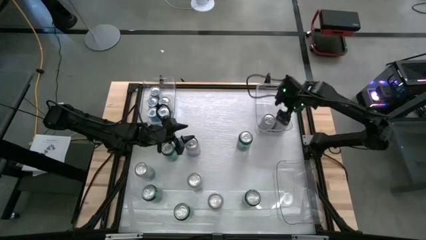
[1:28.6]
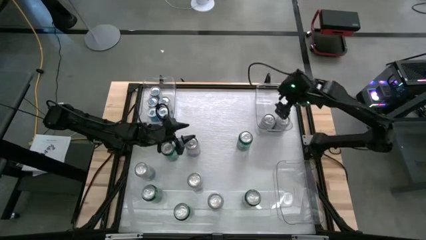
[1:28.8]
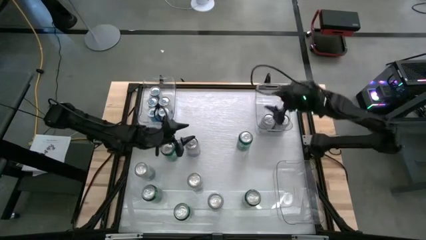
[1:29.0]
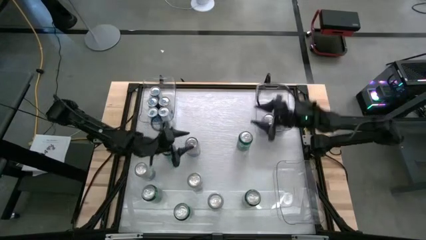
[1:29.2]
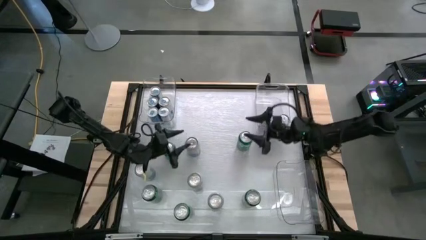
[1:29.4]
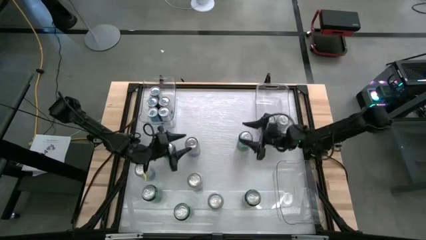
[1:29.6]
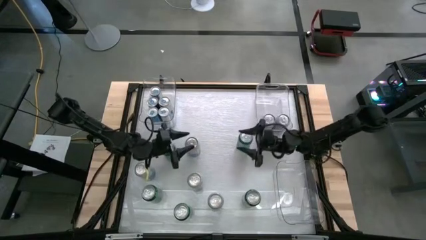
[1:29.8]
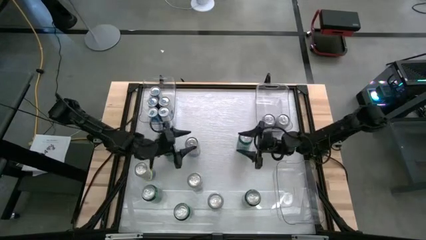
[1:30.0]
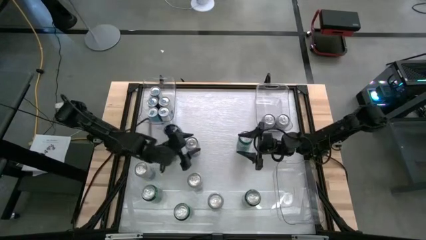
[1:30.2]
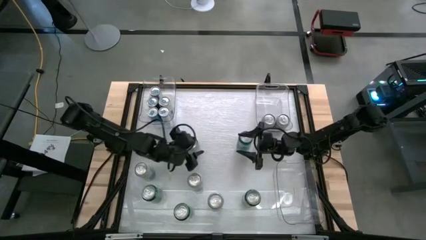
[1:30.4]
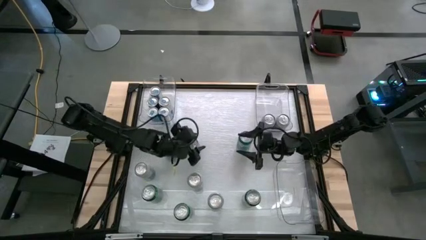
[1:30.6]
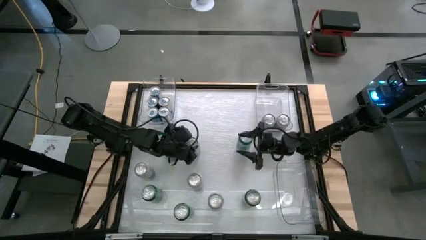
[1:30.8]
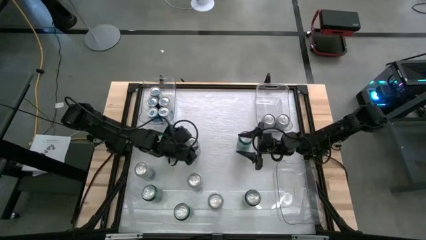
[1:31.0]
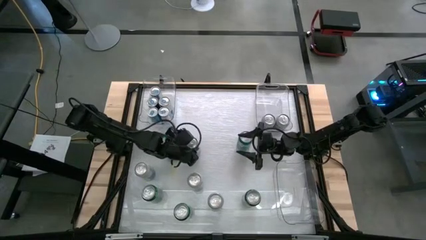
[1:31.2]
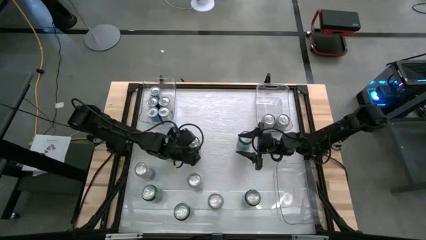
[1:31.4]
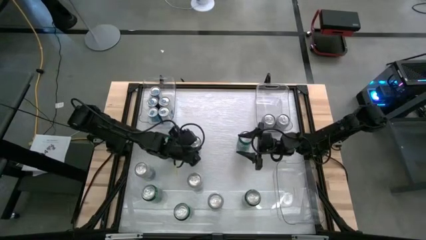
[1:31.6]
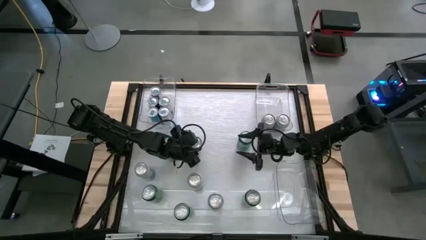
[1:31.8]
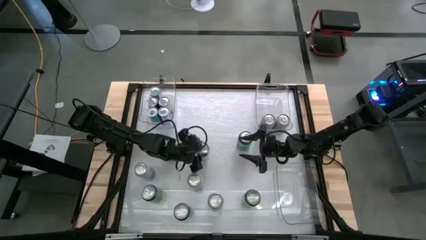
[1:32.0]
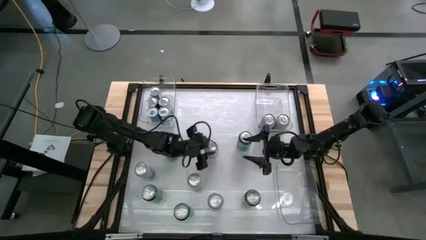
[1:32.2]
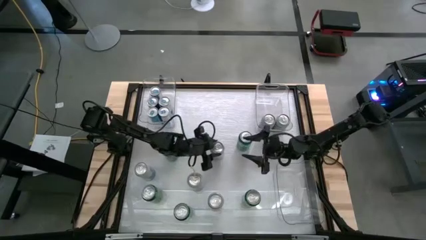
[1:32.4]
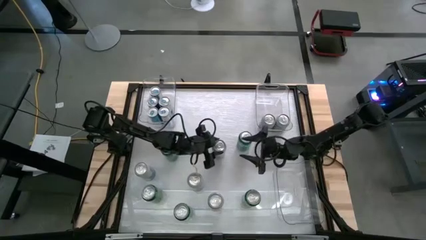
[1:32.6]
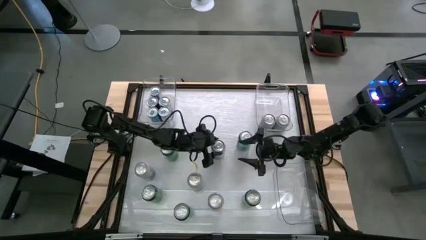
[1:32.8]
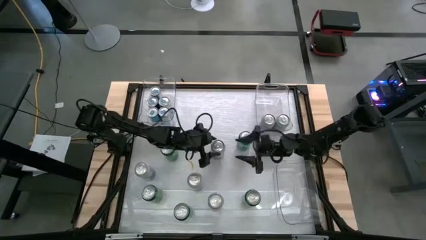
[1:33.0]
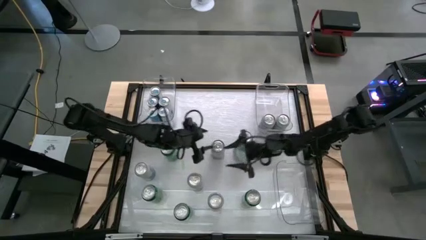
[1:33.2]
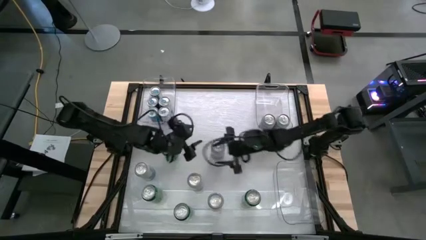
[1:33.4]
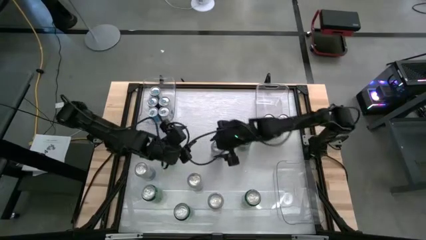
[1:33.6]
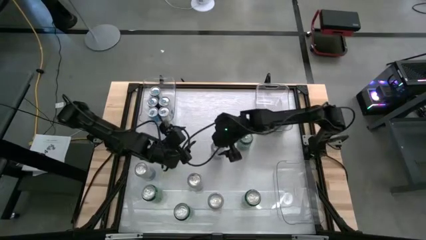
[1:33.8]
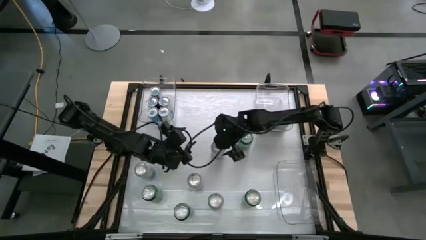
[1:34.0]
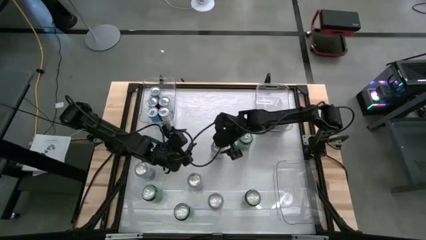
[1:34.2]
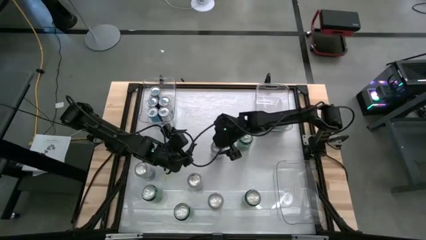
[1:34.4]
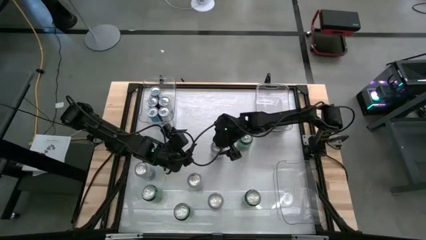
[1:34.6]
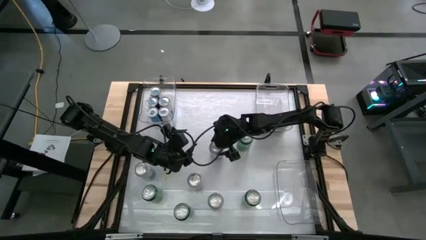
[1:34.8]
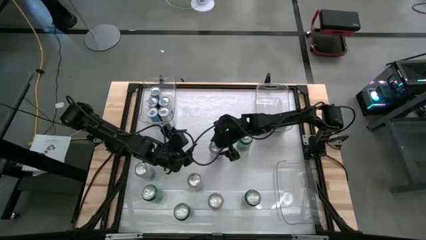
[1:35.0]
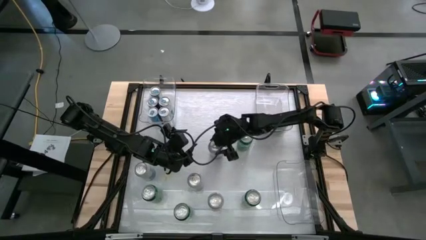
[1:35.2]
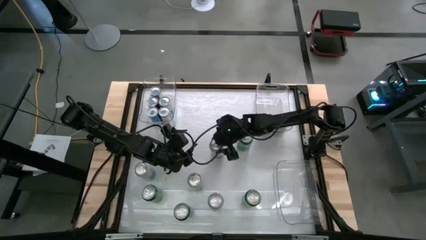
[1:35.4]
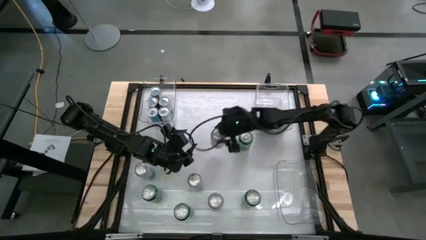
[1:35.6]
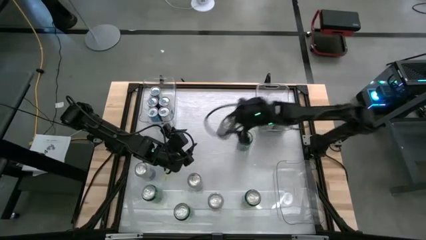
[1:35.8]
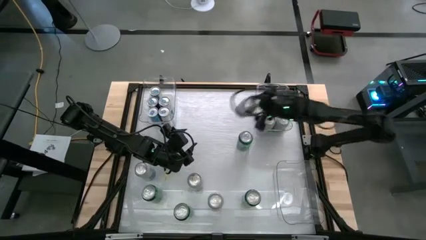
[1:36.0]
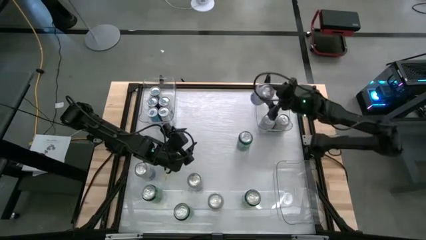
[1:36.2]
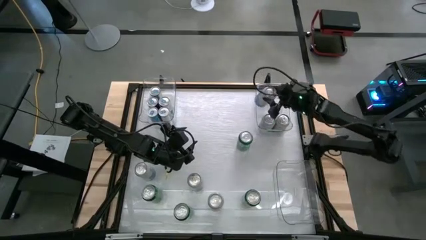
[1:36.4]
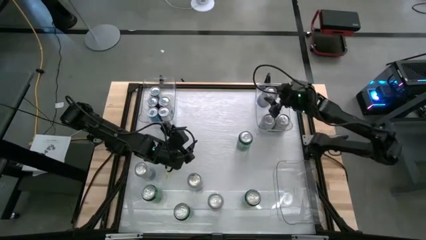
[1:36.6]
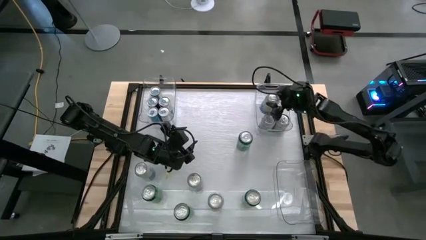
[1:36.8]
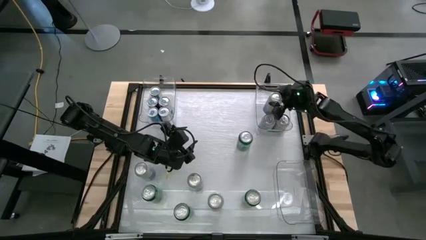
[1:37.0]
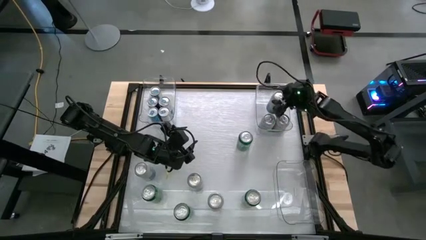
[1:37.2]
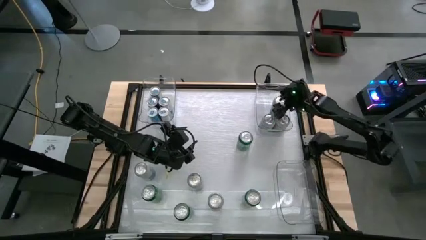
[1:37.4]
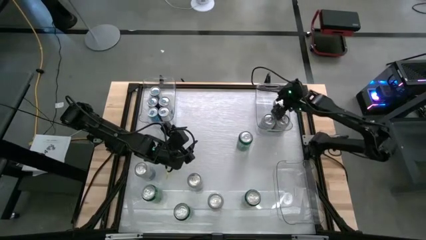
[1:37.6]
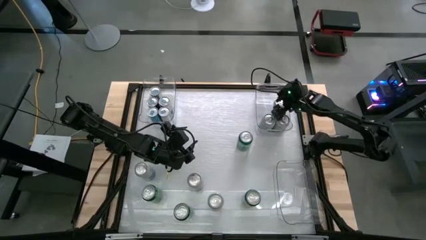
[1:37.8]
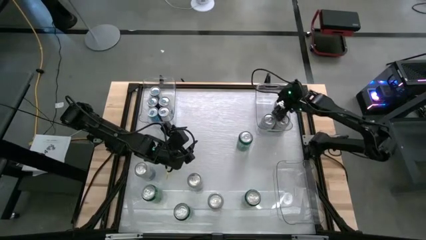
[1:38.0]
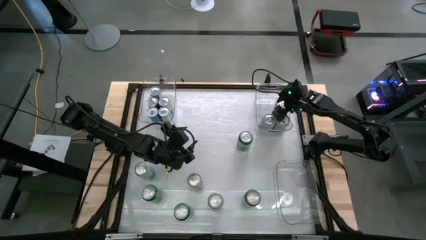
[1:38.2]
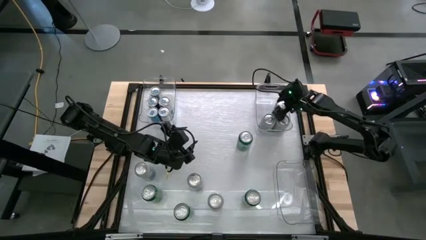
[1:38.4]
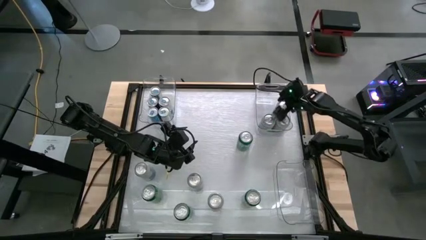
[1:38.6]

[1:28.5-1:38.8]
Task: Sort soda cans
Put the blue-white soda can into the top right transparent bin

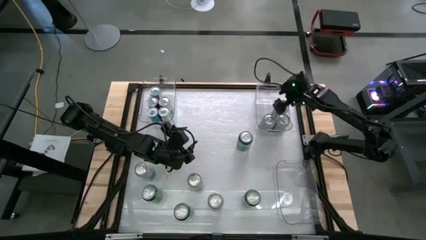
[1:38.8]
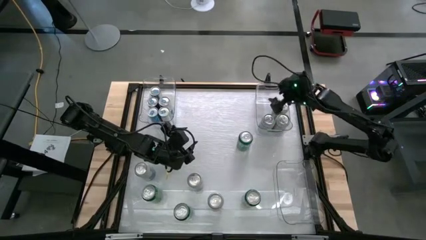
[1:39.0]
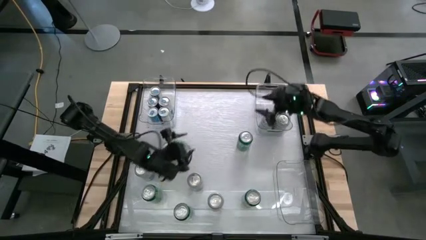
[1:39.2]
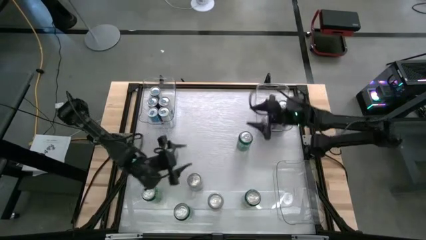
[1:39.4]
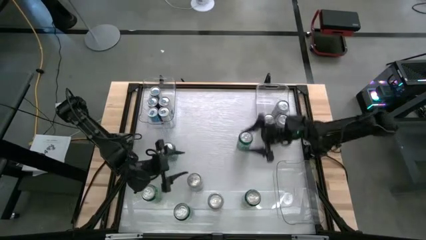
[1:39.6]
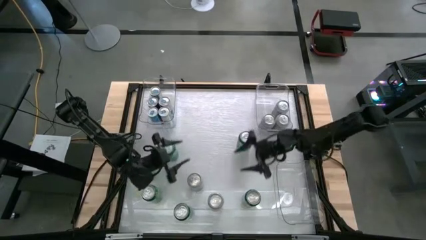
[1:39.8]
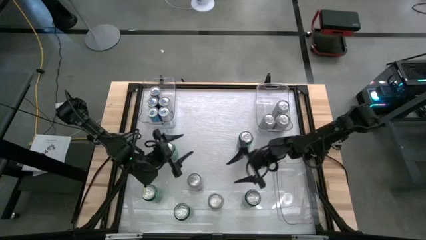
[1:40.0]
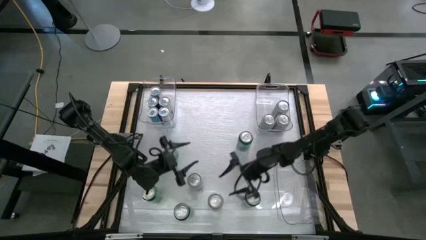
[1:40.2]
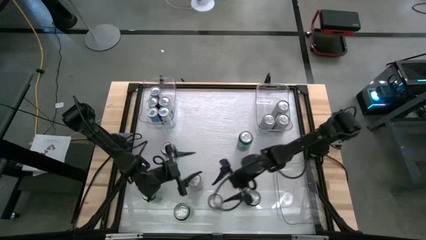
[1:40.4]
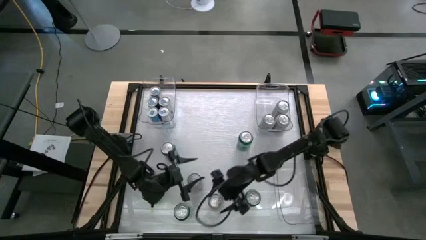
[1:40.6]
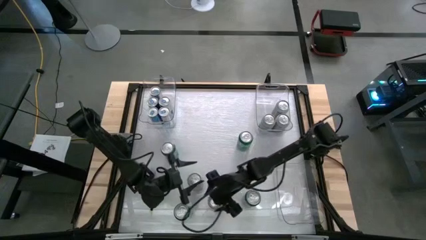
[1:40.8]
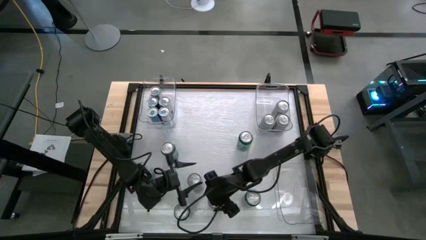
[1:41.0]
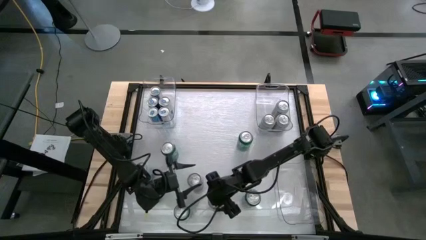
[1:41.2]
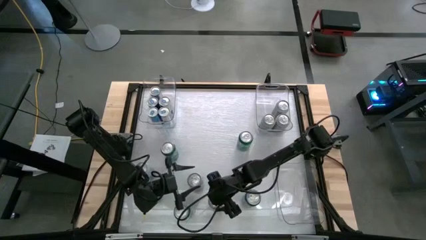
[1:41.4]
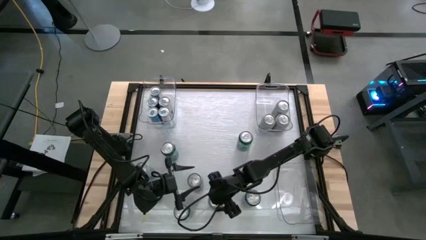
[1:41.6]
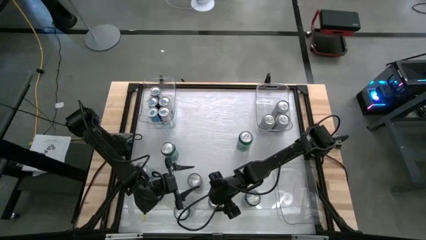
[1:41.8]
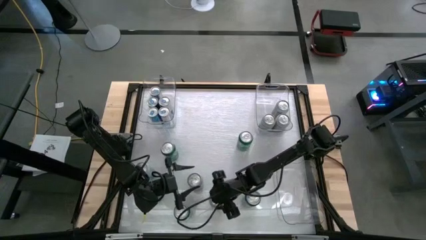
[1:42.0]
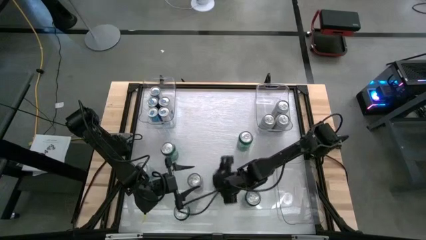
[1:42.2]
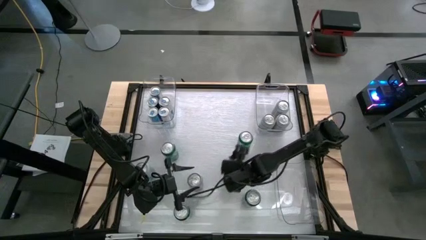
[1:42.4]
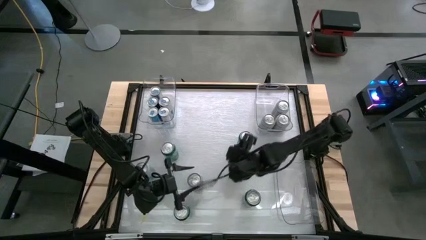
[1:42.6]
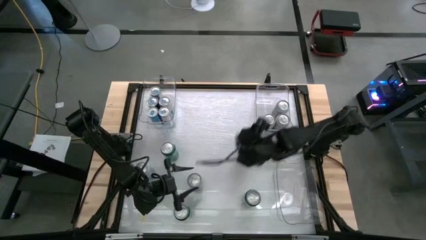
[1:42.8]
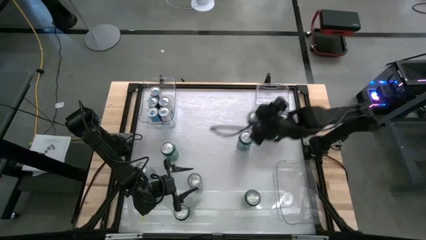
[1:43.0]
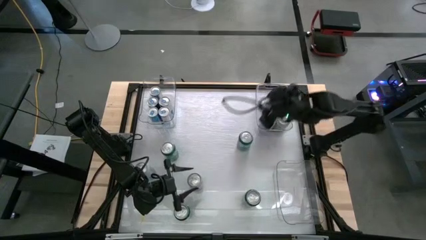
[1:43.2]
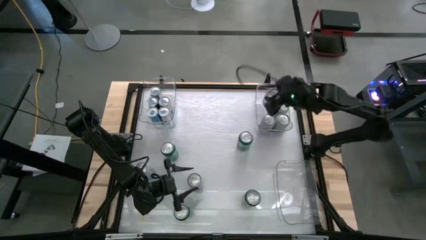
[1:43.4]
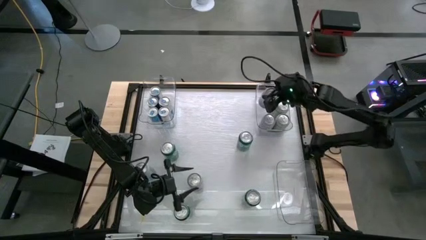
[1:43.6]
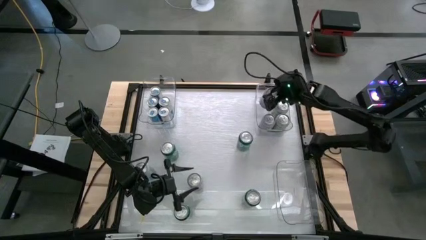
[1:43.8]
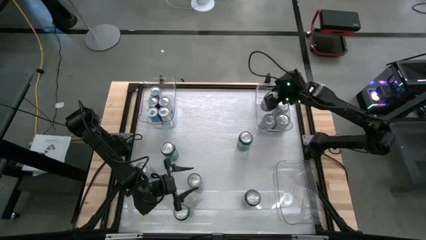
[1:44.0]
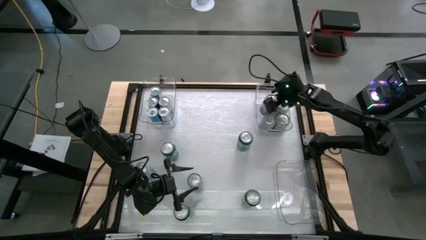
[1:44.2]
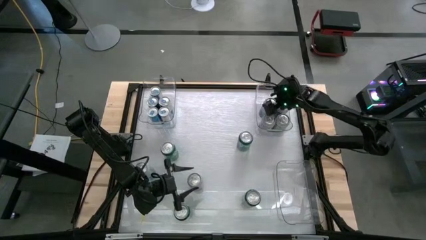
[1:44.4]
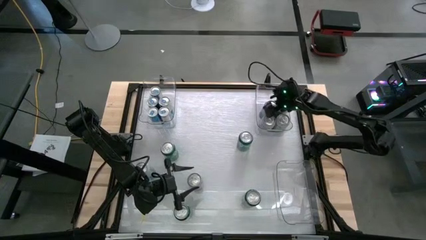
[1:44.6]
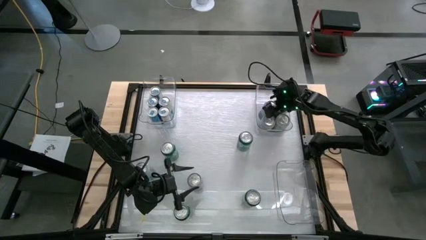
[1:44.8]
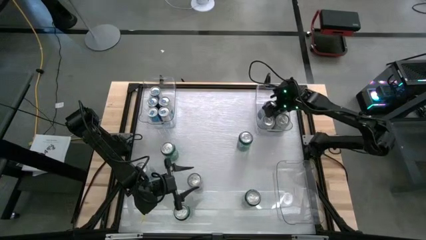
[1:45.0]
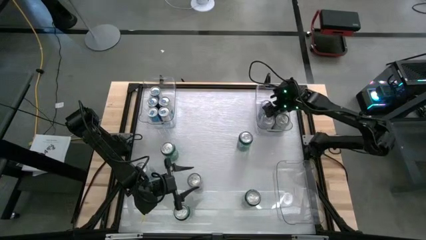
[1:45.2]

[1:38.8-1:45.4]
Put the blue-white soda can into the top right transparent bin
